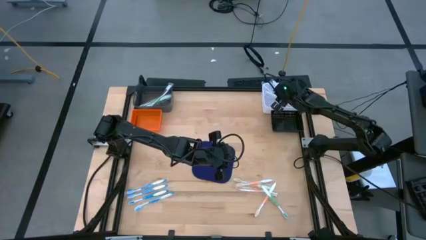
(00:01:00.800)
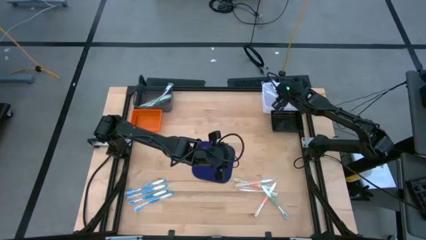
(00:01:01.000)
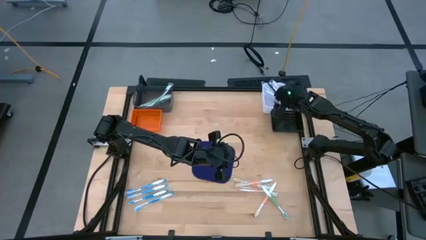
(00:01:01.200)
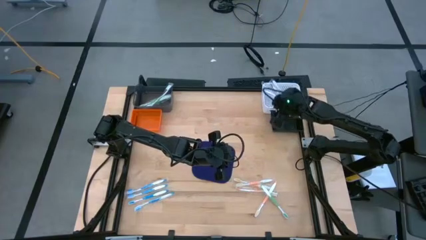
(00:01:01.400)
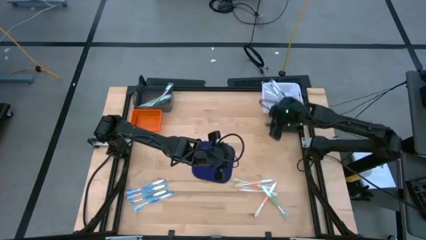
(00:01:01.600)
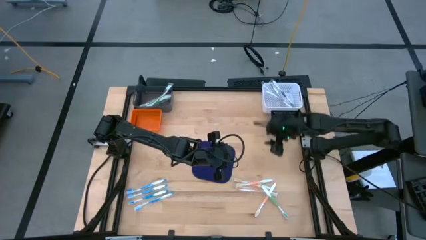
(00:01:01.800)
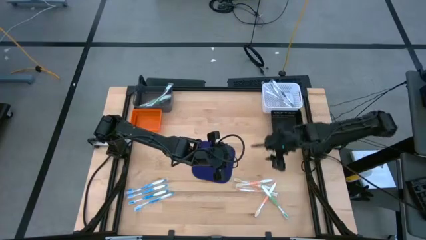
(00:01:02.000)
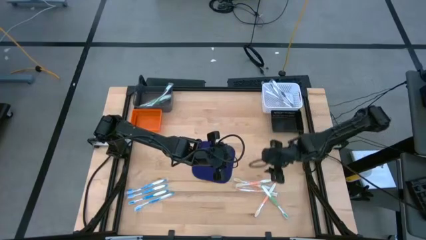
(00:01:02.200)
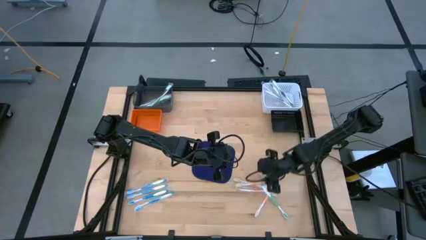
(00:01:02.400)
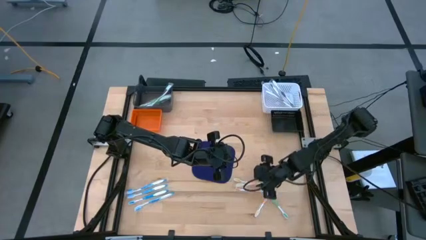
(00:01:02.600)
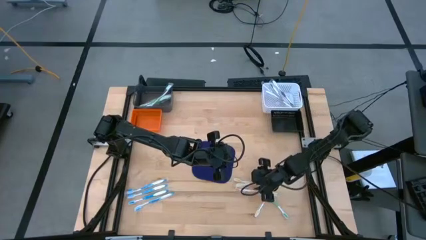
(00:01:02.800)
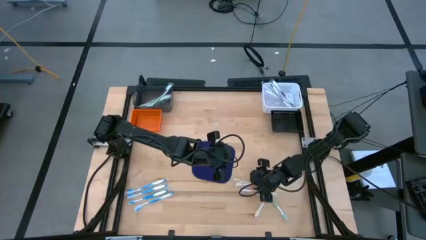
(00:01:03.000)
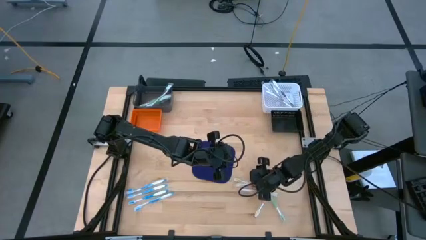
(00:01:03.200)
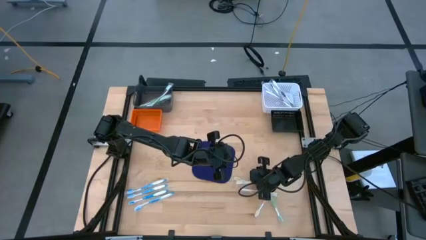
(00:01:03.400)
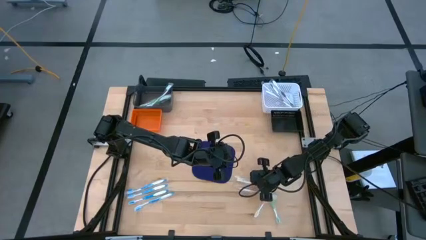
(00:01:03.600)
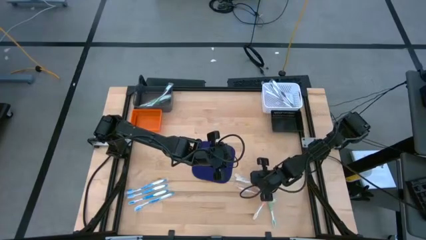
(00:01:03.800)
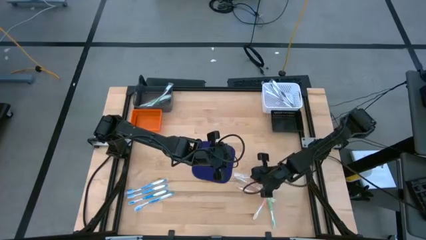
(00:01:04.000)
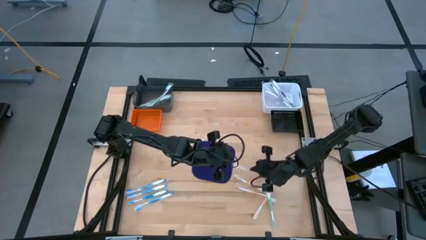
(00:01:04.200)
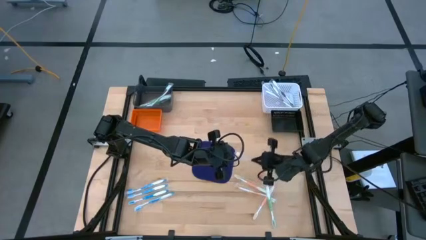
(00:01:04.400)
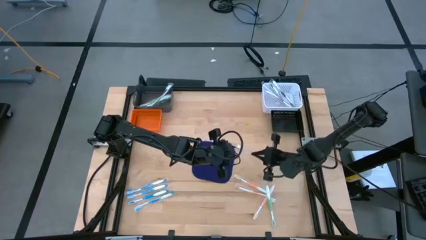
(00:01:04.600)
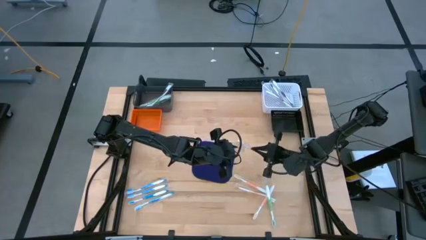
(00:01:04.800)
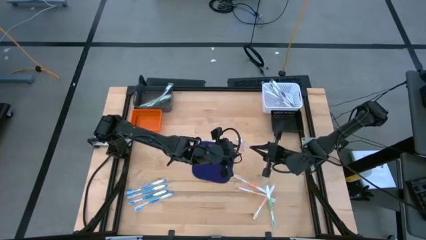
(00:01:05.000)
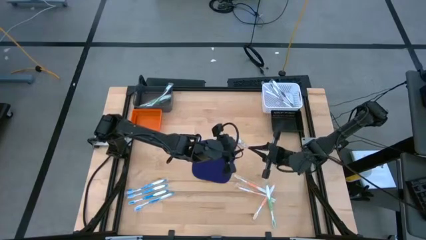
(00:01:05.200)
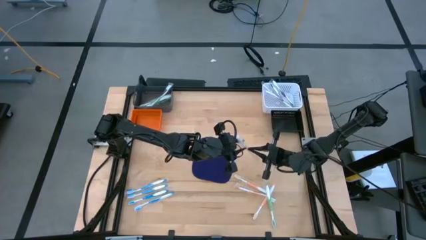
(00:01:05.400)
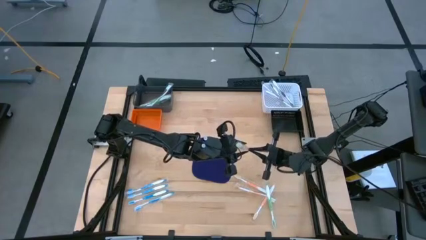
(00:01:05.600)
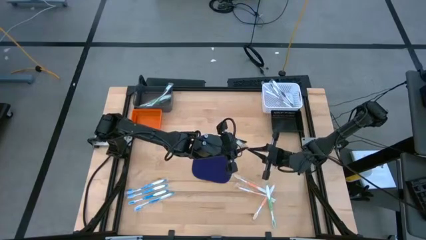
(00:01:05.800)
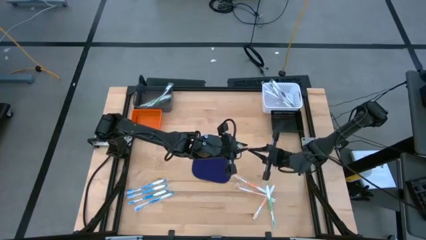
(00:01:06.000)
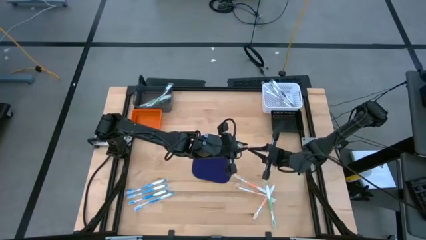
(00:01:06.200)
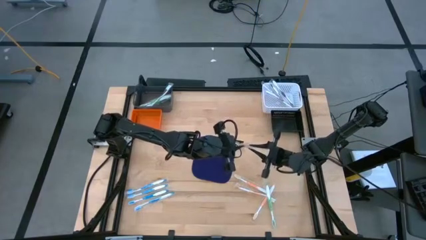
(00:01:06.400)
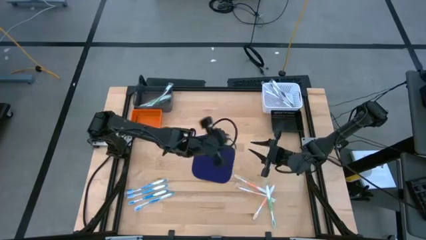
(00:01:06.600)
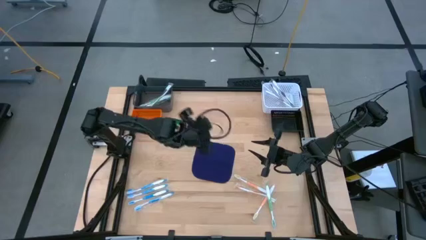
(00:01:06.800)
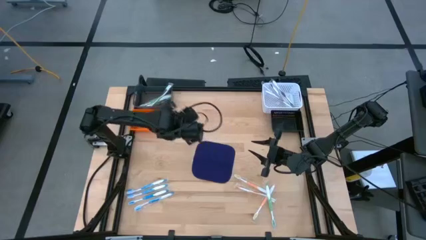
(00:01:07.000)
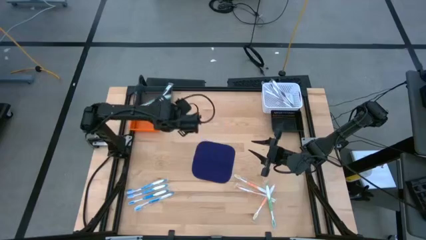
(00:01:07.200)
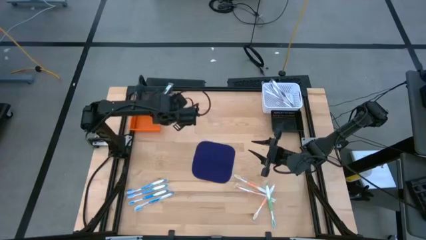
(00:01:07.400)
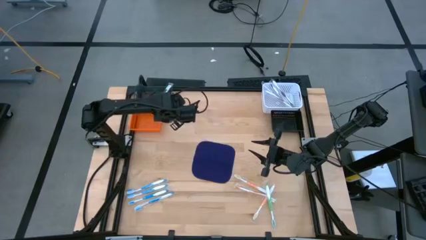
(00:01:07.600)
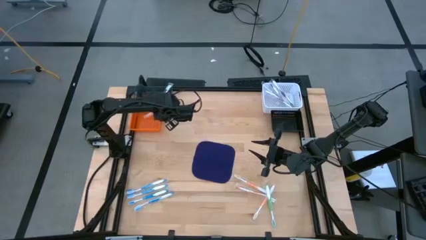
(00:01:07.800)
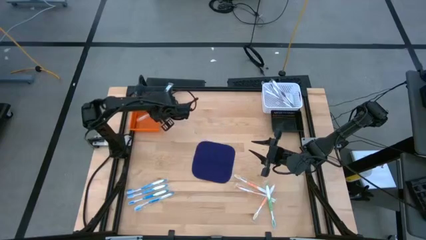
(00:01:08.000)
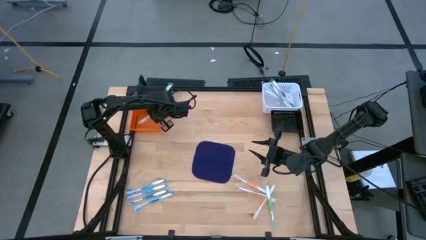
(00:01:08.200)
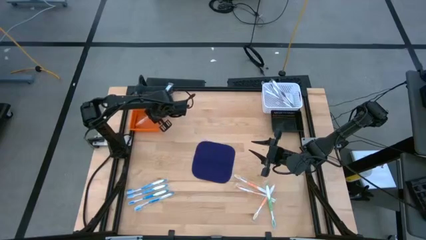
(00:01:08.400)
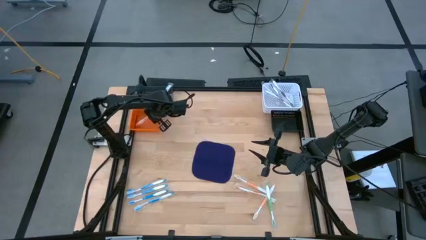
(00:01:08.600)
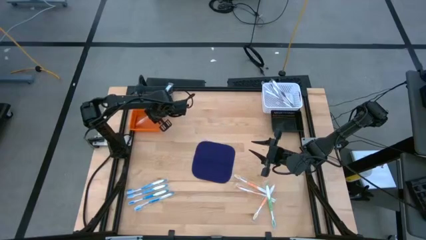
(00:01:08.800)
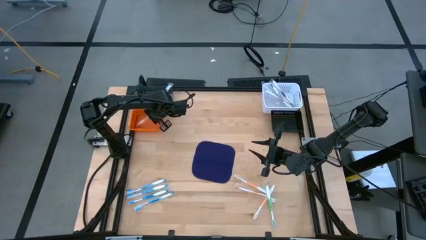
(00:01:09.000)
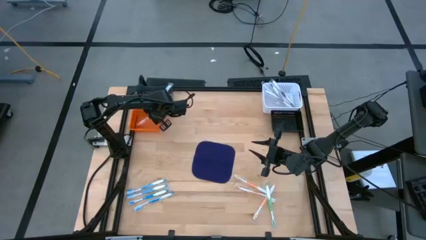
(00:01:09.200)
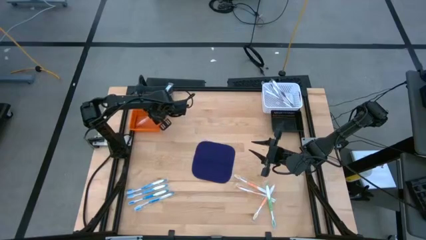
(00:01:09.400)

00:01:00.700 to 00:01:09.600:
Task: Pick & Place Toothbrushes
Put the orange toothbrush into the orange bin

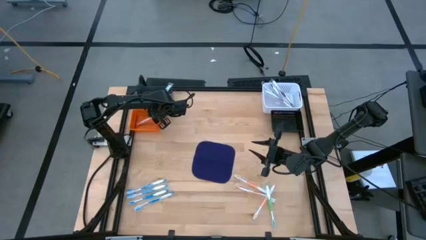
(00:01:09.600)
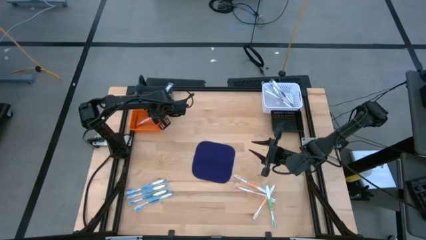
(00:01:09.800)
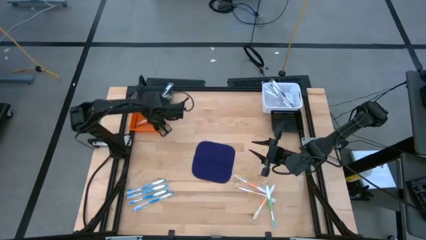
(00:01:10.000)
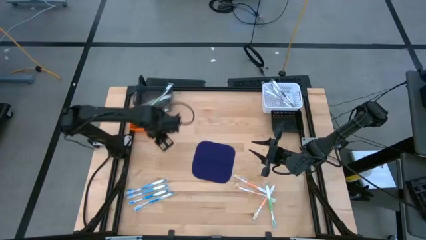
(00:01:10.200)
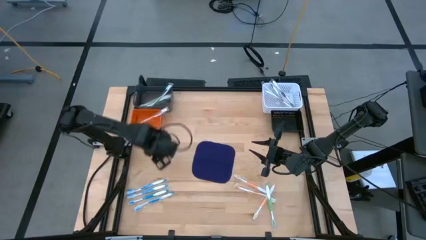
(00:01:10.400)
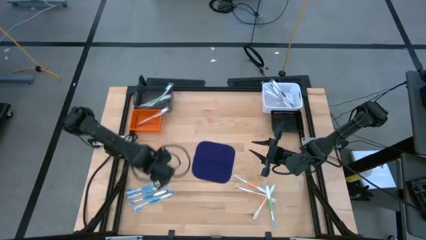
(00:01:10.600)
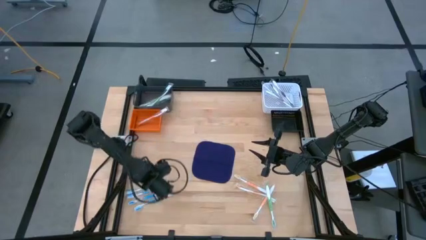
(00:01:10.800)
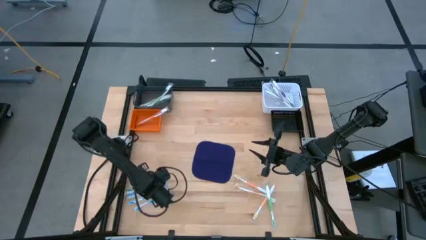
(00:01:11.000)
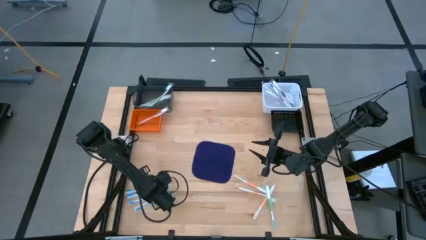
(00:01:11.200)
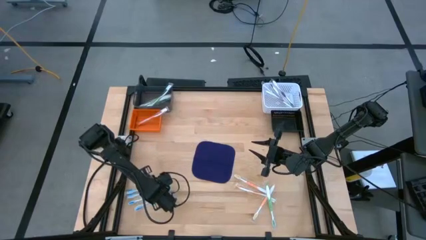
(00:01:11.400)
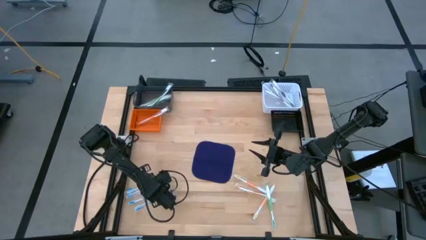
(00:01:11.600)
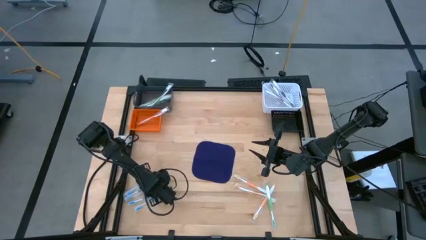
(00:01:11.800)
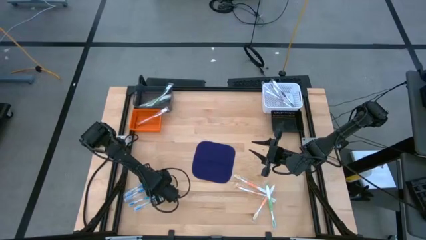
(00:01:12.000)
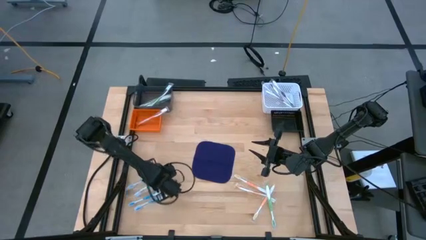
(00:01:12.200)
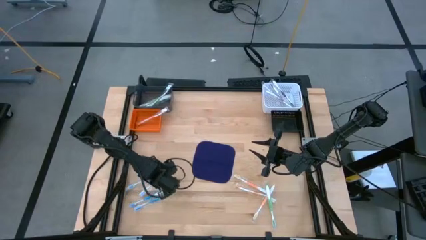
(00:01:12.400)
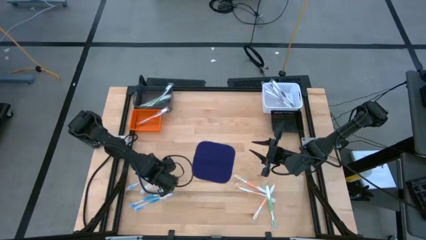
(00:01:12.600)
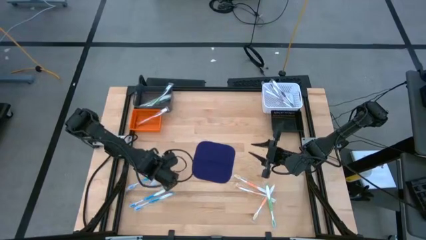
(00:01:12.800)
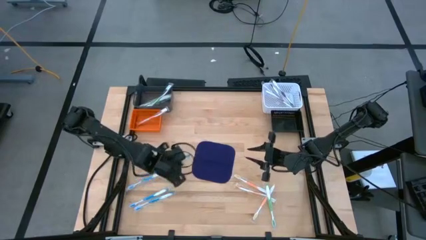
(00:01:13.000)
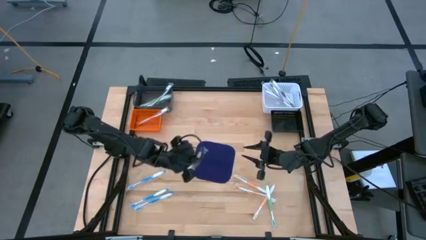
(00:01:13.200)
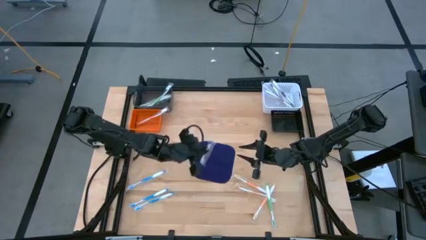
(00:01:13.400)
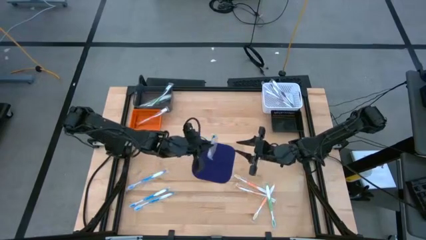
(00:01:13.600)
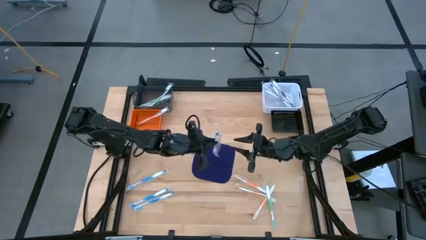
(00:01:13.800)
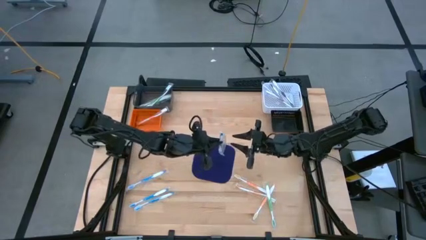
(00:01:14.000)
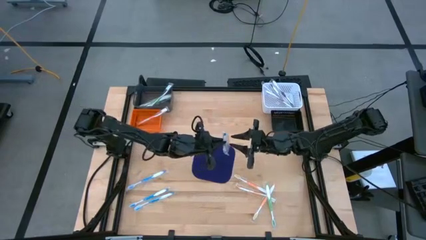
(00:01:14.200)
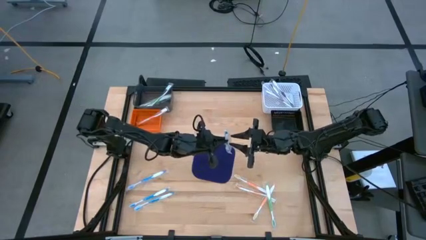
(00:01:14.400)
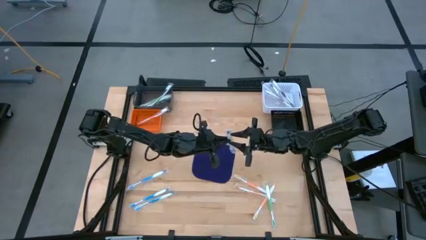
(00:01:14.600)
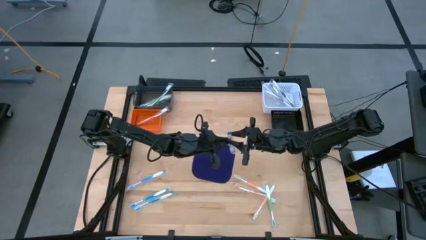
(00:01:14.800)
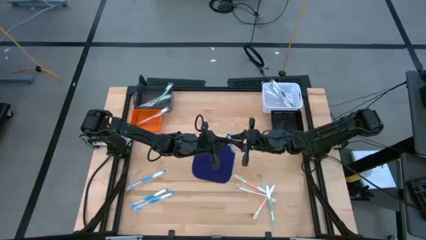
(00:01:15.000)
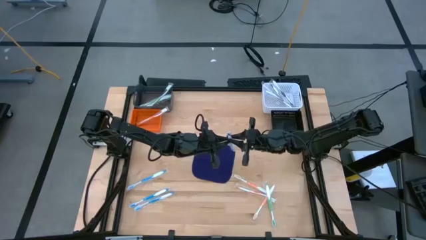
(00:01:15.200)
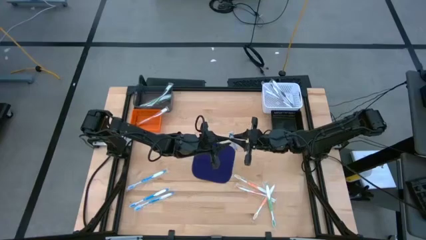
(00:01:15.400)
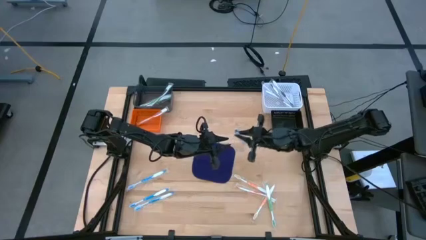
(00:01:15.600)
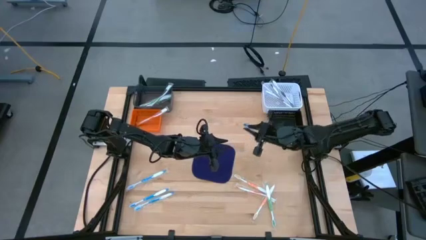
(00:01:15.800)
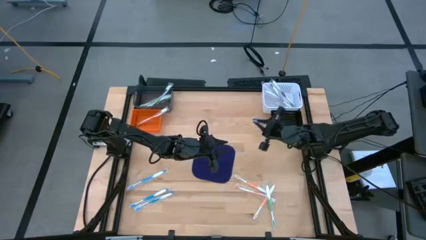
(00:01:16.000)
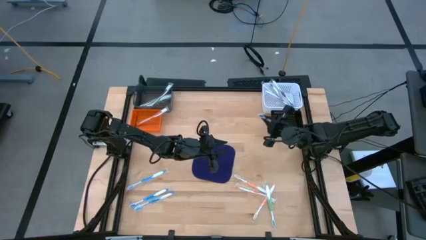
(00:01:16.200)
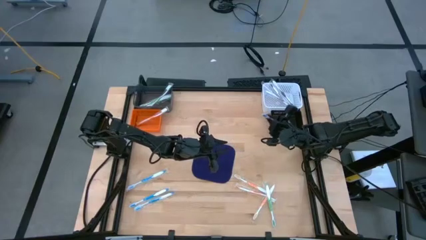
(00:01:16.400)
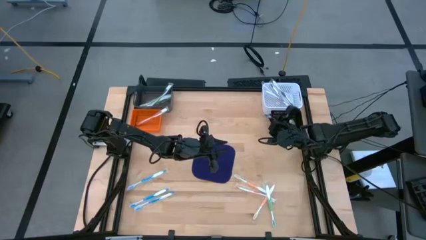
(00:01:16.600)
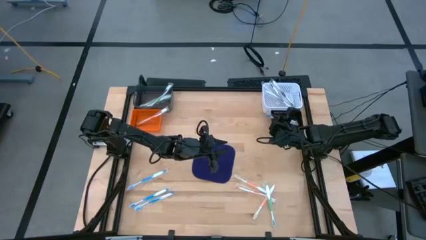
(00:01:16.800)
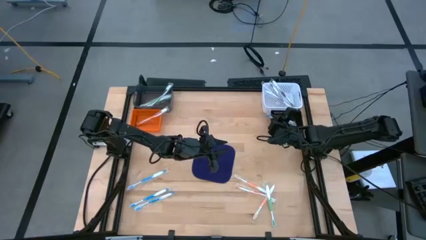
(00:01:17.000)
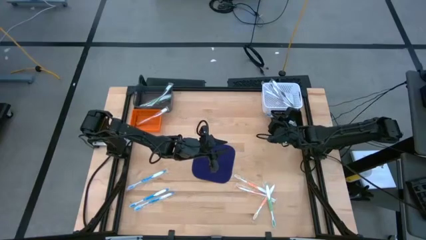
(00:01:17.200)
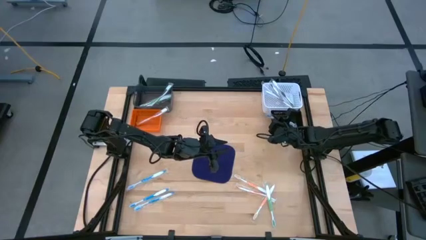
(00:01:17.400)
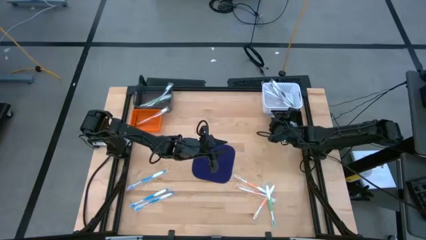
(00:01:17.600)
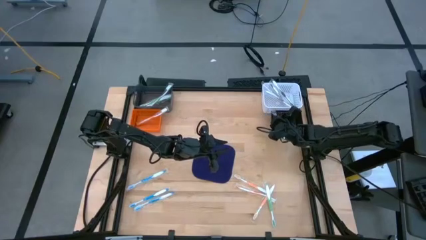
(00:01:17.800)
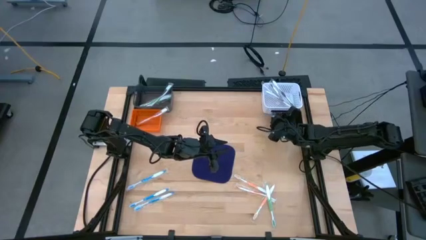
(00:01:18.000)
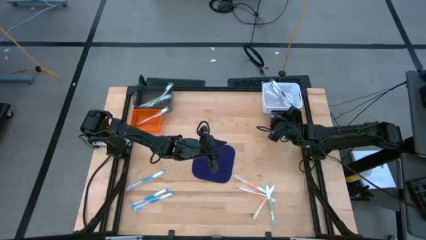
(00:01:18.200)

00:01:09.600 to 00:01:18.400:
Put the blue toothbrush into the black bin
